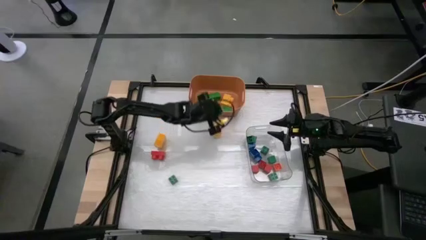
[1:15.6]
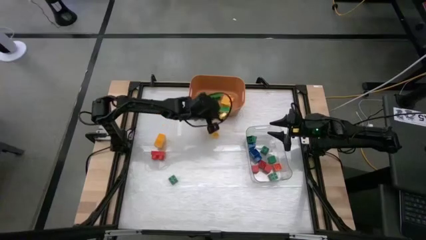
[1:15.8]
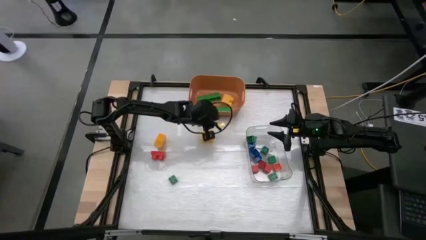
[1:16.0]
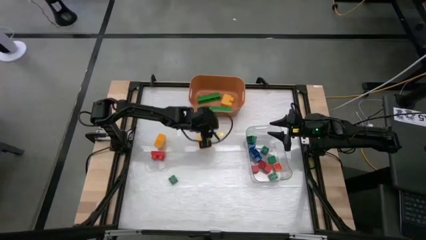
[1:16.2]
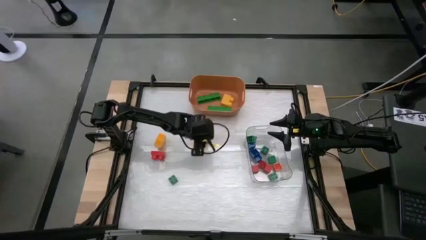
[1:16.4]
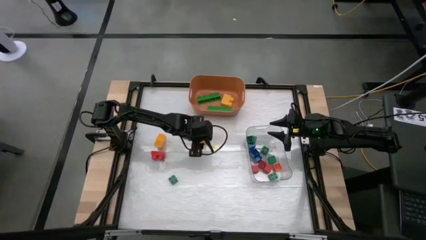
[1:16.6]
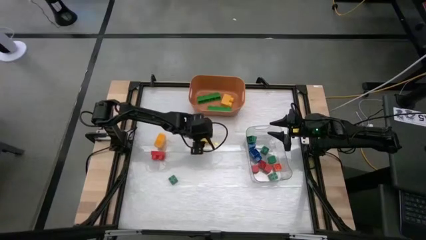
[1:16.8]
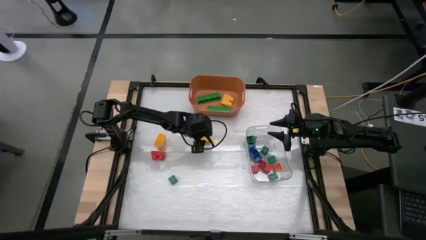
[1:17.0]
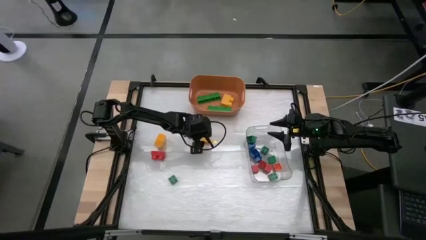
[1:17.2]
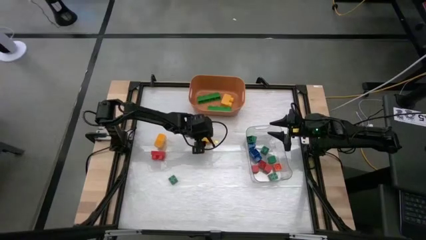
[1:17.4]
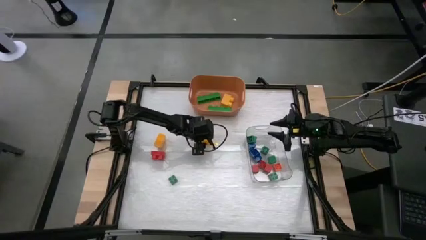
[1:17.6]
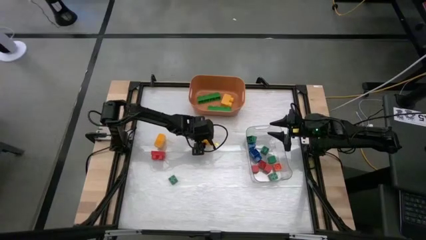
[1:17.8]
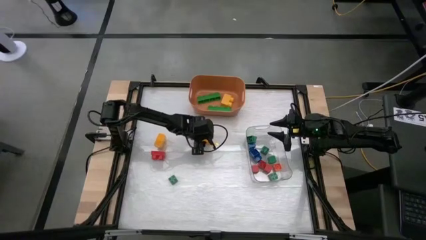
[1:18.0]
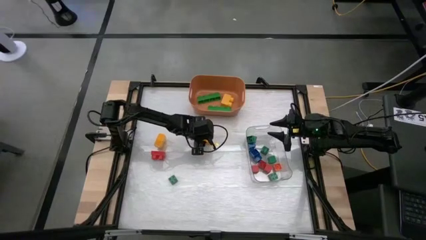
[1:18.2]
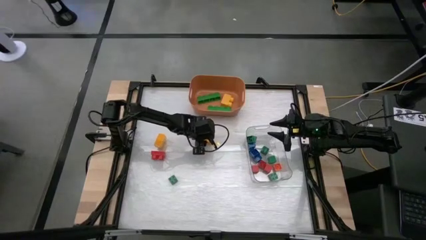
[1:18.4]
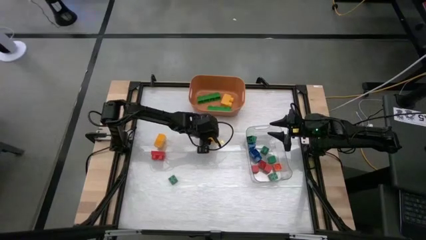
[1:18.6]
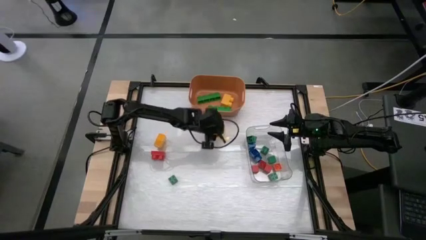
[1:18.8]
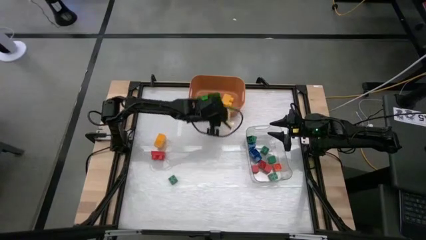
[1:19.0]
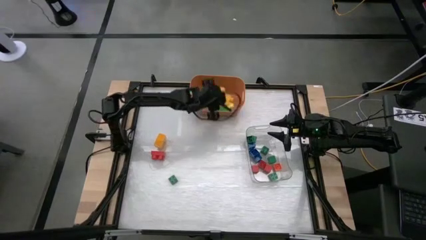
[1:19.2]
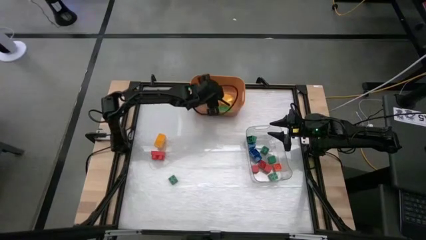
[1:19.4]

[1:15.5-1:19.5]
Task: Sort blocks by size
Put the big yellow game piece into the orange bin

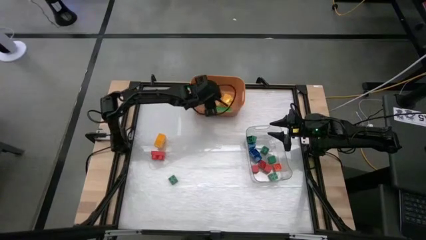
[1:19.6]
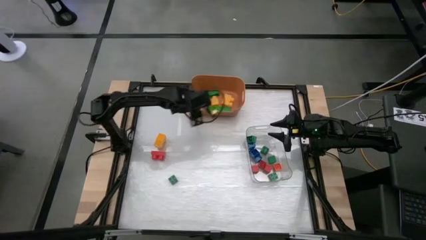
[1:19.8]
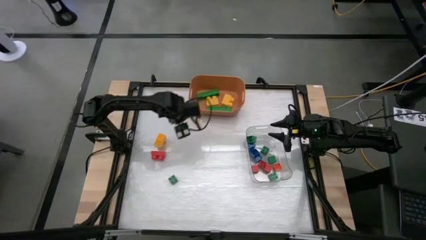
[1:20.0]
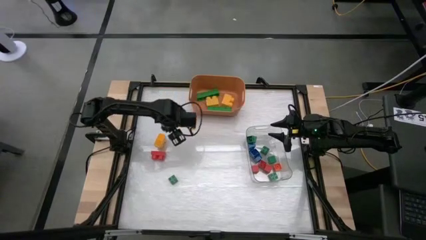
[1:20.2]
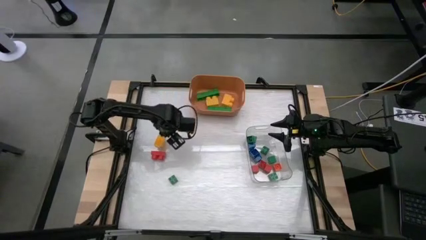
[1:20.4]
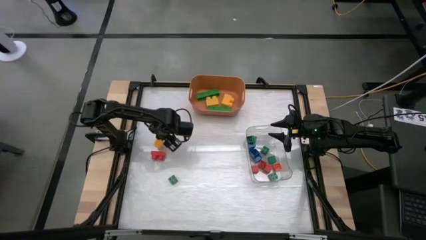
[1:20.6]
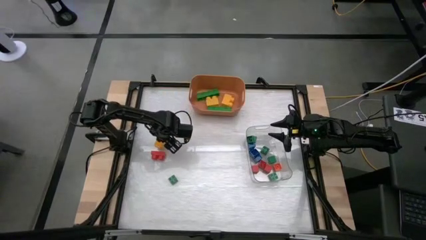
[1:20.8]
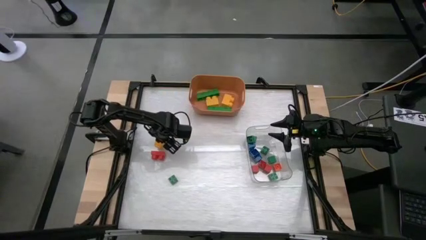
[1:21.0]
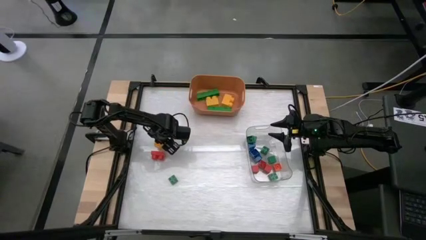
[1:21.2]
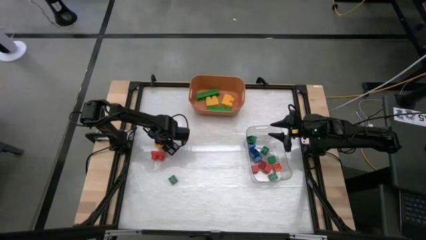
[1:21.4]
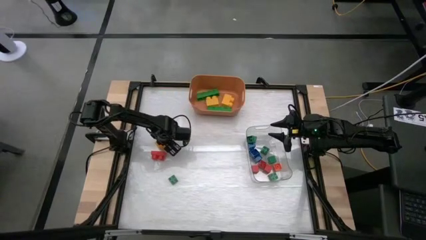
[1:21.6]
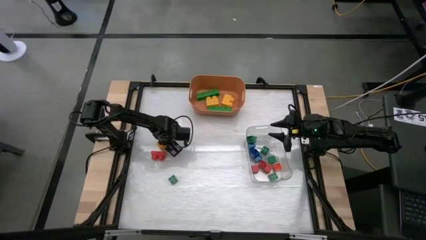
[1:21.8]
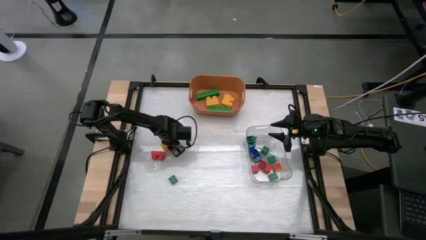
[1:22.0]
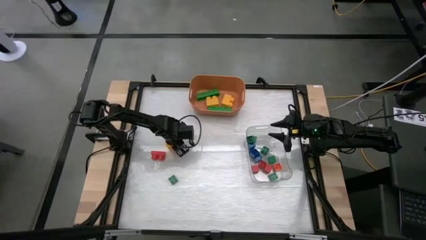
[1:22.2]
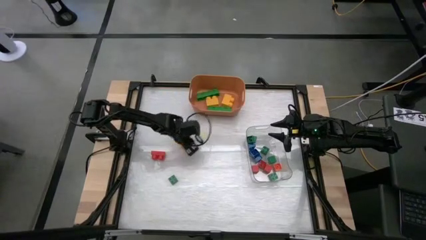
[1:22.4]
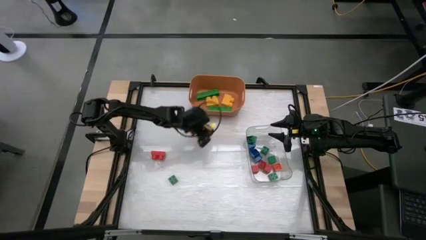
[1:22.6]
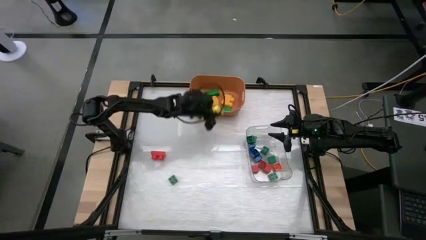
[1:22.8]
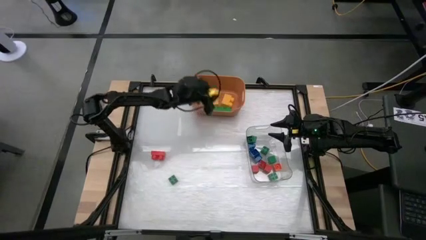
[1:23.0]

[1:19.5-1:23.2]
Put the big yellow game piece into the orange bin

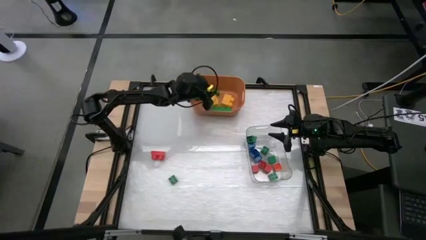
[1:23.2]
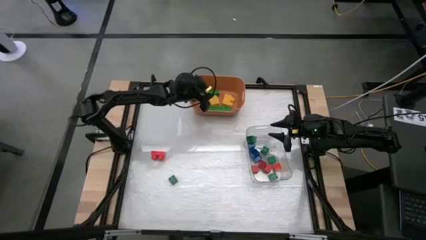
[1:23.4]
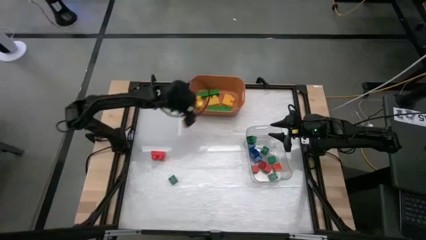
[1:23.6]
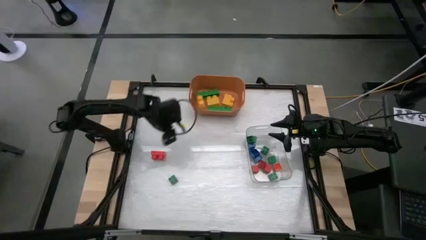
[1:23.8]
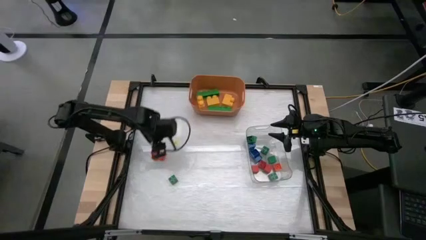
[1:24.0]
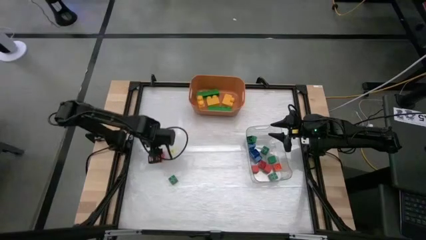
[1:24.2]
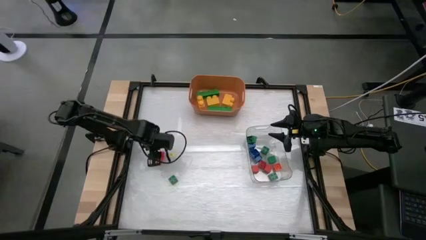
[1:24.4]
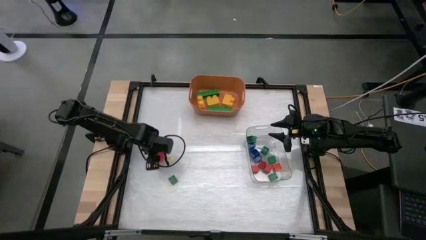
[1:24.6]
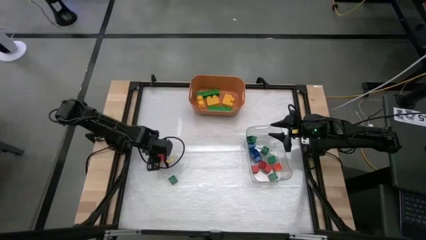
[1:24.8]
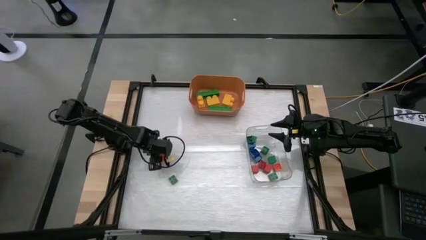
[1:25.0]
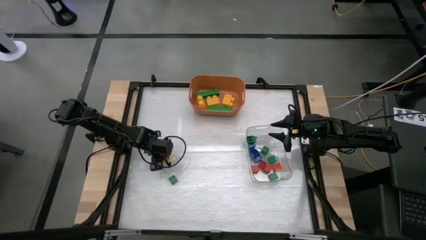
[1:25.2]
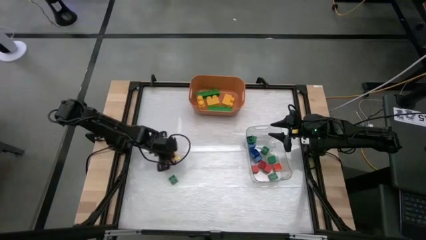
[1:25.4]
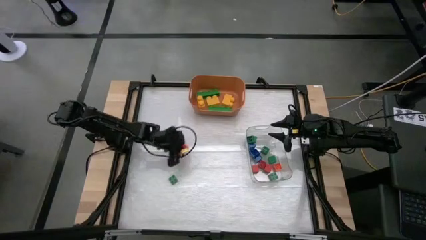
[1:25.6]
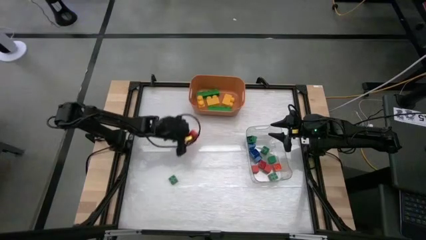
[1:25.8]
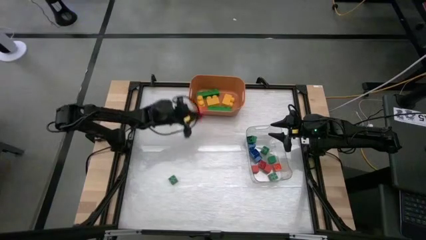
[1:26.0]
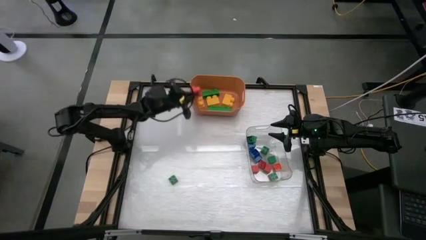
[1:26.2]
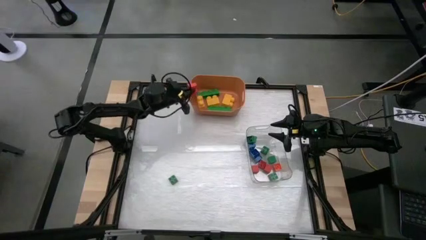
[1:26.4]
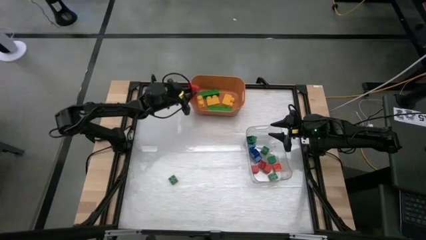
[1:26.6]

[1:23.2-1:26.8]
Put the big red game piece into the orange bin

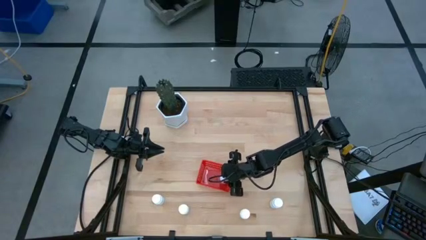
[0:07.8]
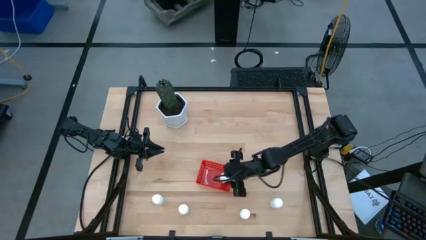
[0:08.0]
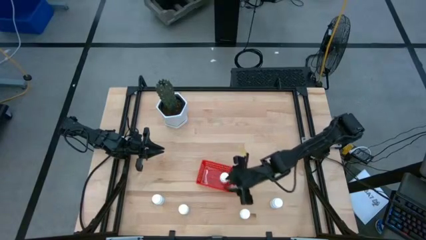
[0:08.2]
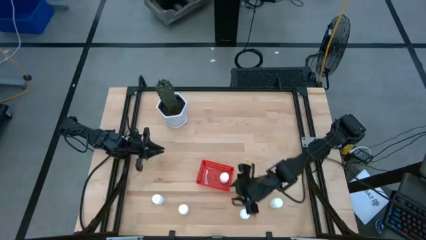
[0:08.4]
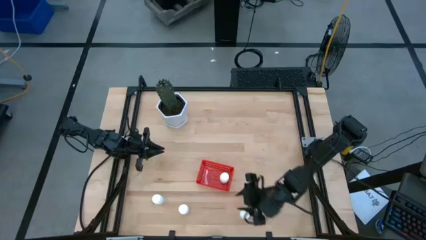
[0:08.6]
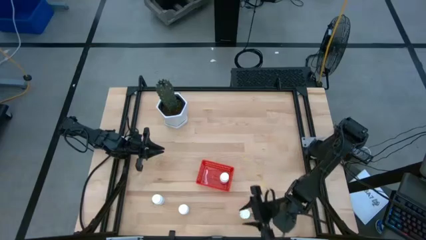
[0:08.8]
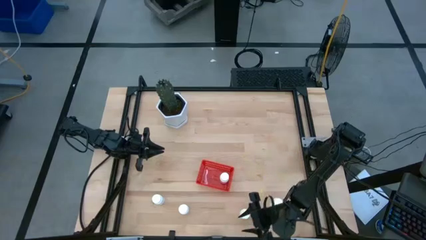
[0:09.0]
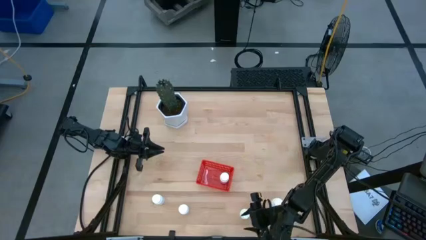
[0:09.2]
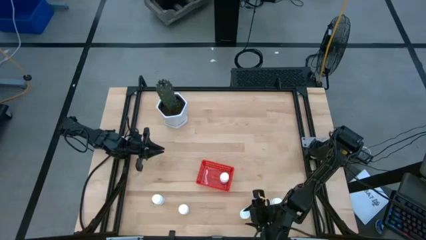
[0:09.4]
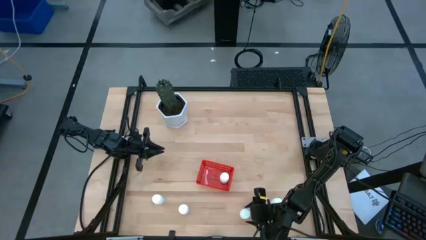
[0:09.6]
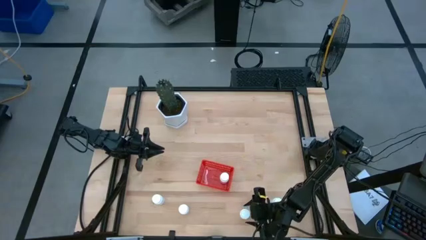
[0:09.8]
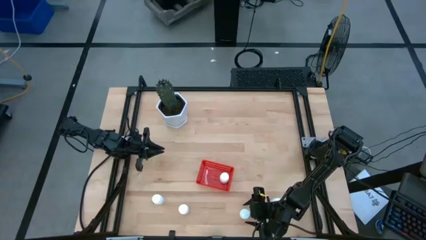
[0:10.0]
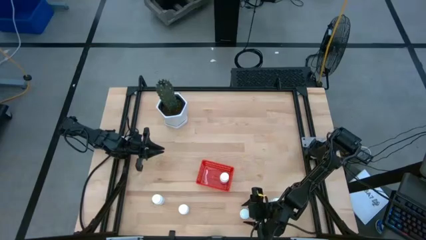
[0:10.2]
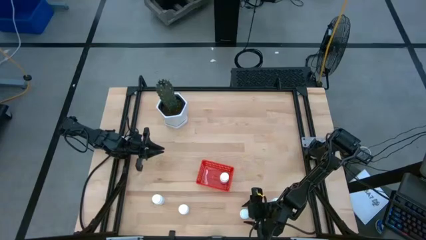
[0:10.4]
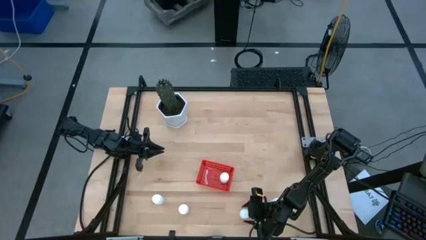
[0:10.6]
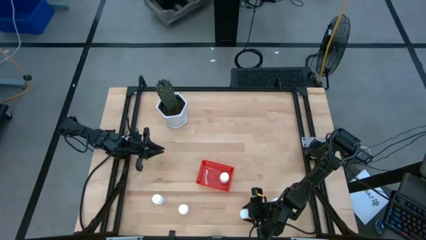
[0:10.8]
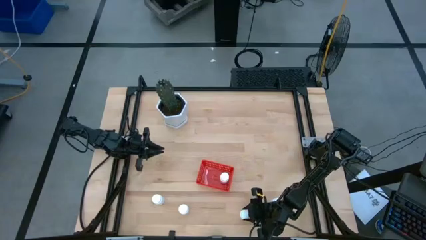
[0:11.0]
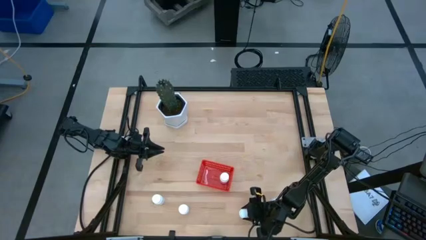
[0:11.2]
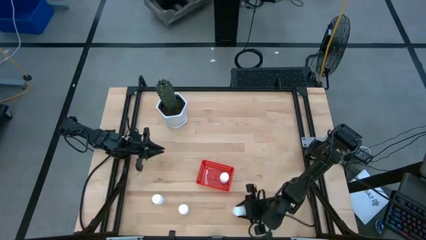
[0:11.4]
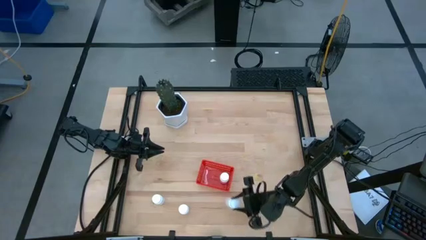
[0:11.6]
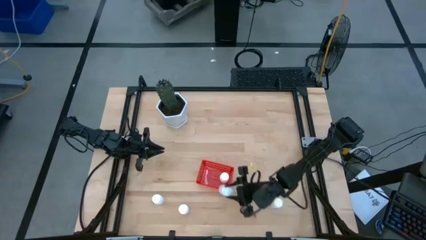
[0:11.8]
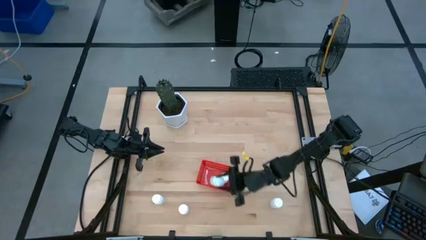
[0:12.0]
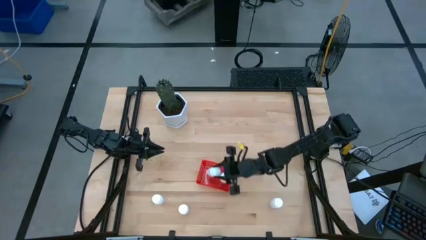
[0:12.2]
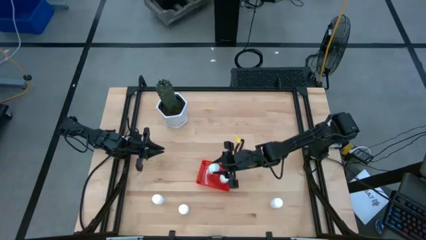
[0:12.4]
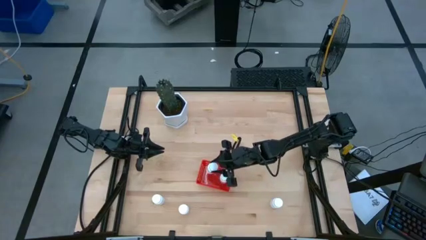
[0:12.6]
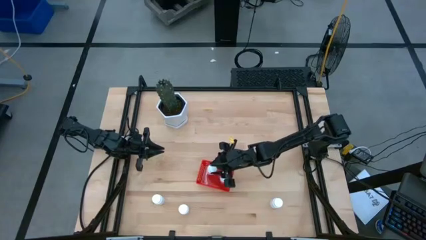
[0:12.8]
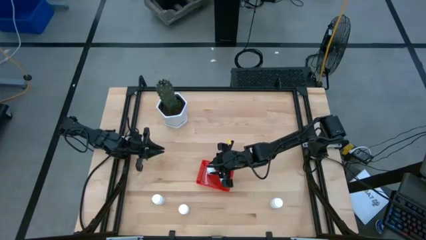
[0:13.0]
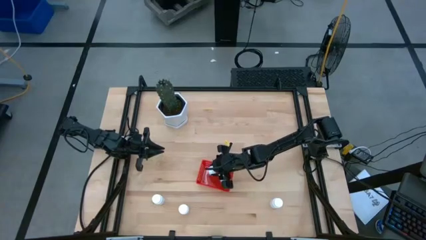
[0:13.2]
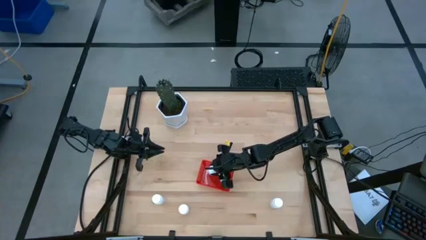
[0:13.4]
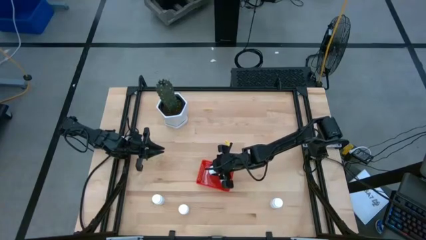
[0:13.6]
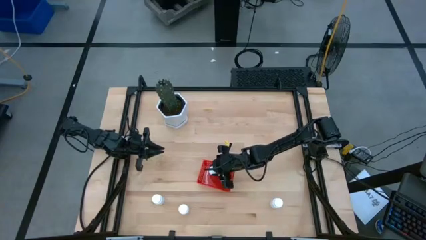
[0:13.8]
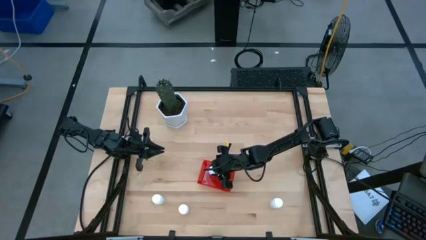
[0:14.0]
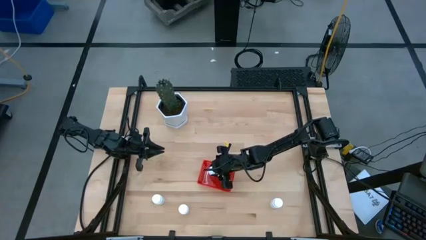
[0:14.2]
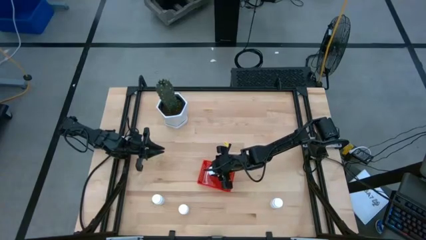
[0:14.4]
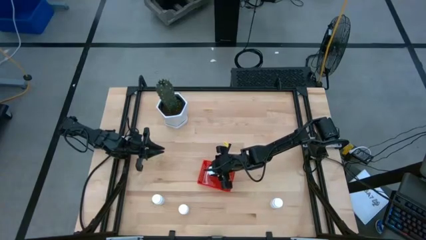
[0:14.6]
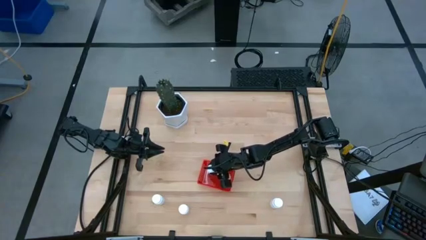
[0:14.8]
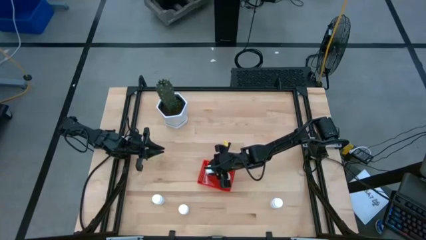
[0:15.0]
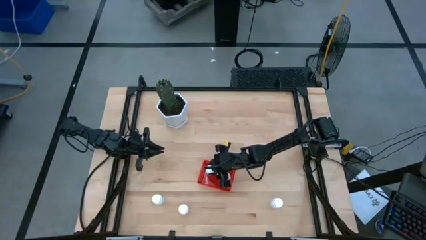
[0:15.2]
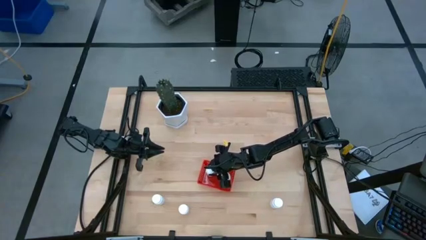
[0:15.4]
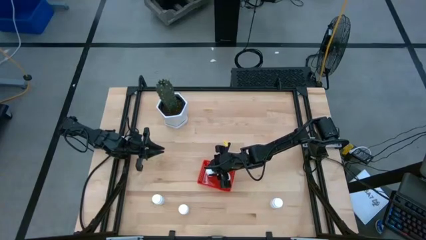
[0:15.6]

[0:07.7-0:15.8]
Task: Pick and place pill bottles into a basket
Put the white pill bottle into the red bin
